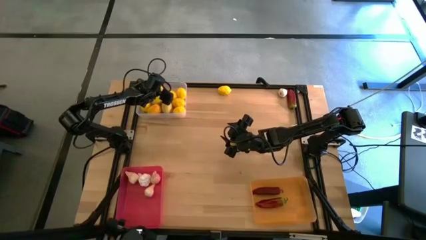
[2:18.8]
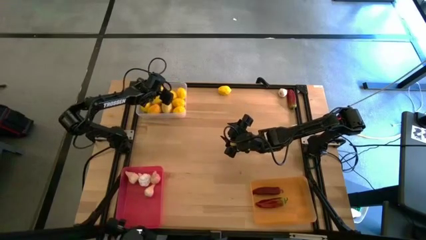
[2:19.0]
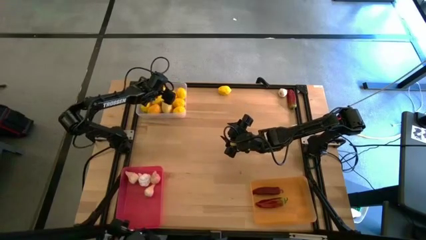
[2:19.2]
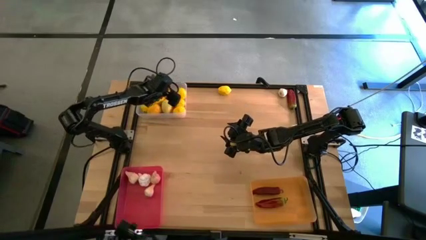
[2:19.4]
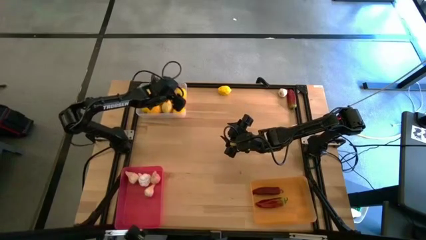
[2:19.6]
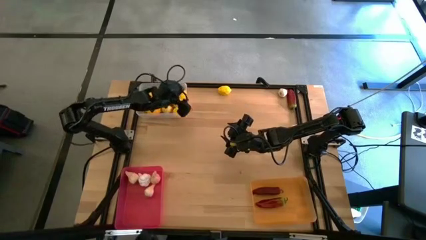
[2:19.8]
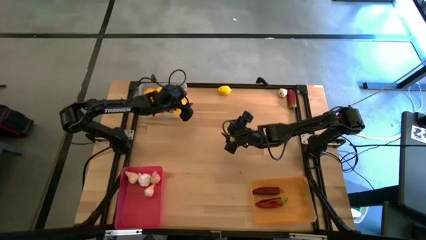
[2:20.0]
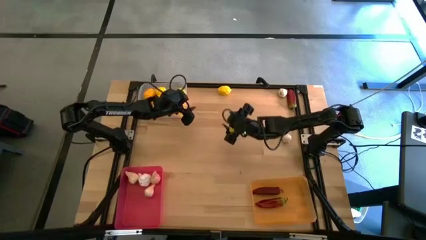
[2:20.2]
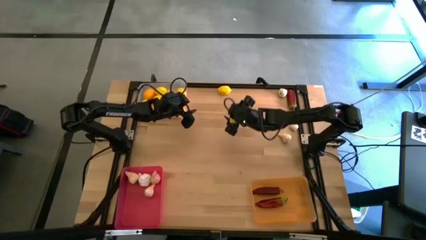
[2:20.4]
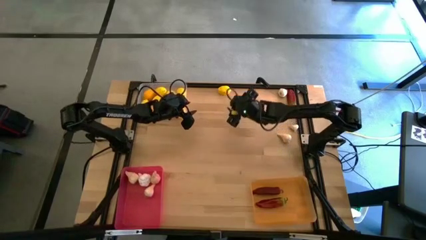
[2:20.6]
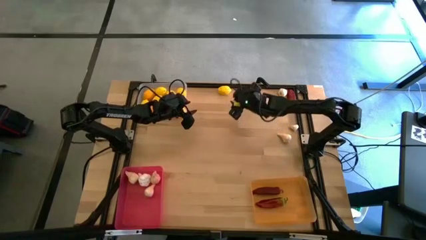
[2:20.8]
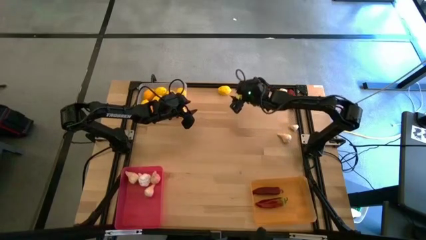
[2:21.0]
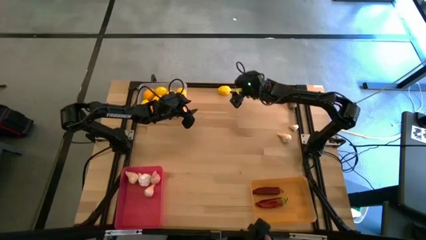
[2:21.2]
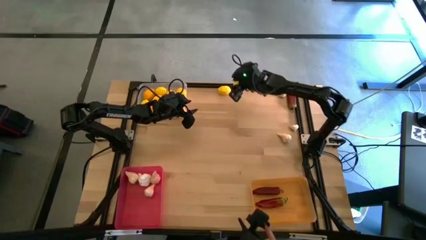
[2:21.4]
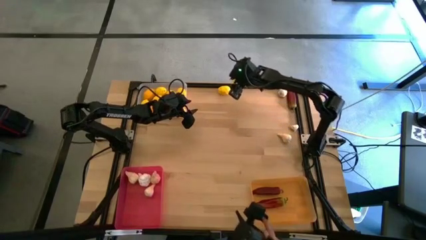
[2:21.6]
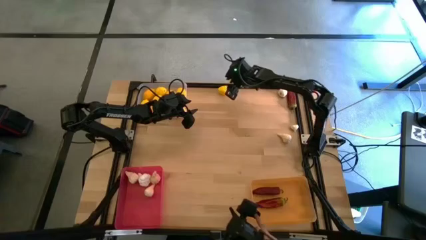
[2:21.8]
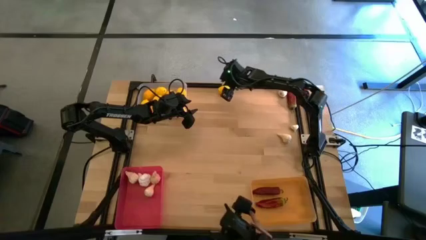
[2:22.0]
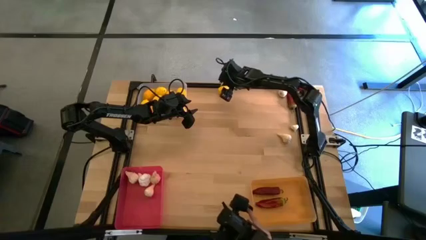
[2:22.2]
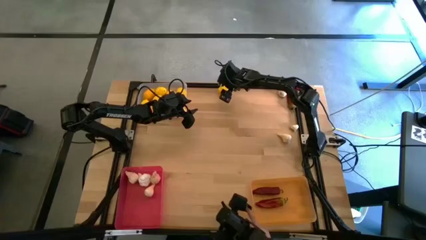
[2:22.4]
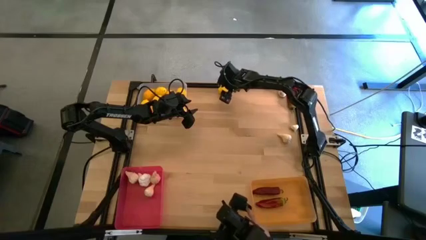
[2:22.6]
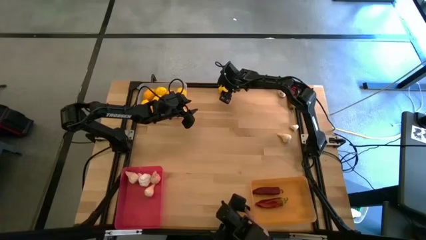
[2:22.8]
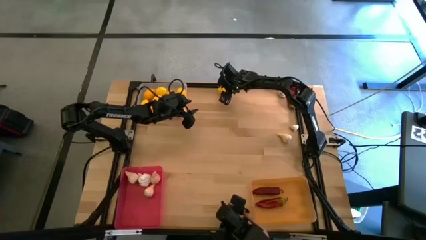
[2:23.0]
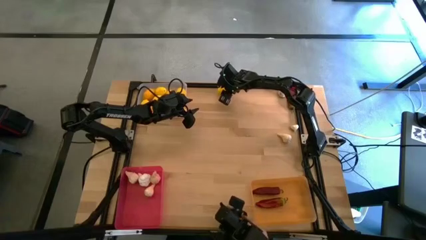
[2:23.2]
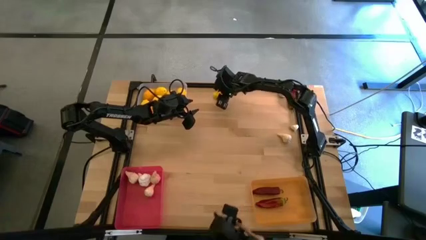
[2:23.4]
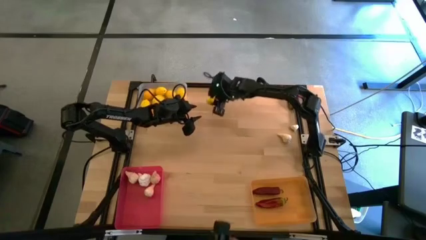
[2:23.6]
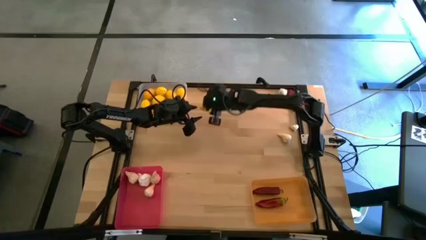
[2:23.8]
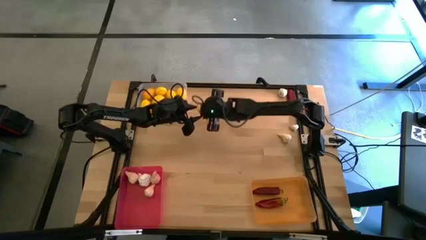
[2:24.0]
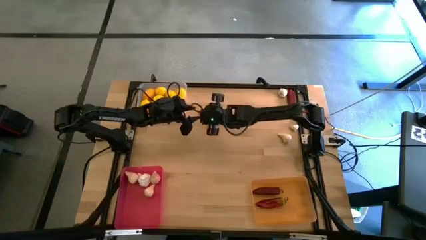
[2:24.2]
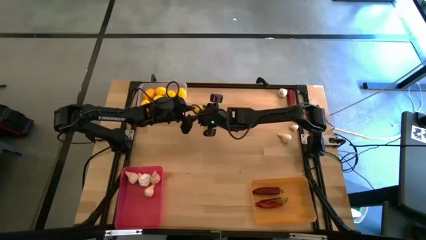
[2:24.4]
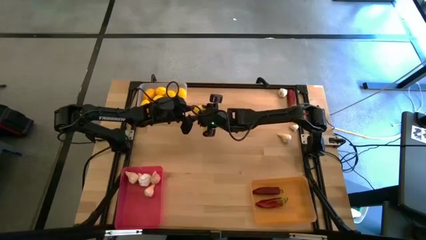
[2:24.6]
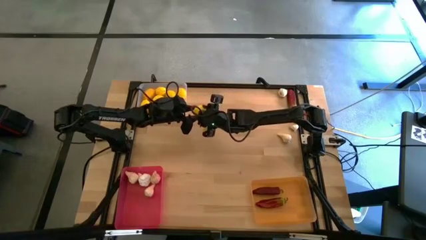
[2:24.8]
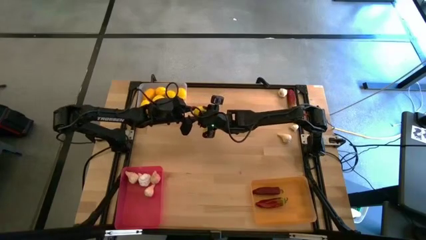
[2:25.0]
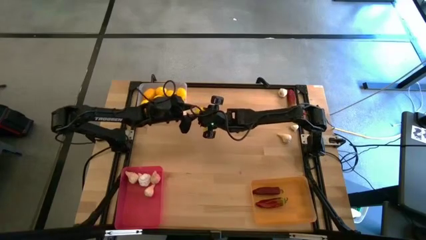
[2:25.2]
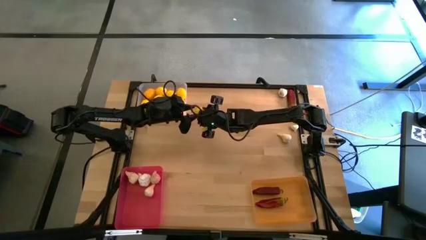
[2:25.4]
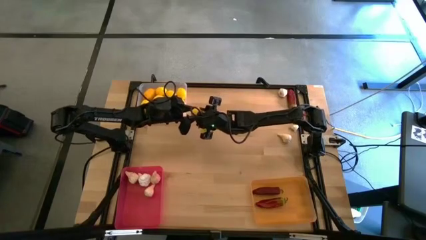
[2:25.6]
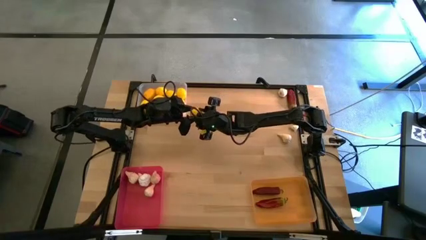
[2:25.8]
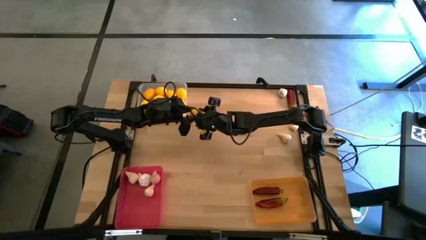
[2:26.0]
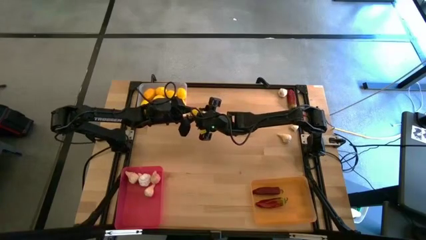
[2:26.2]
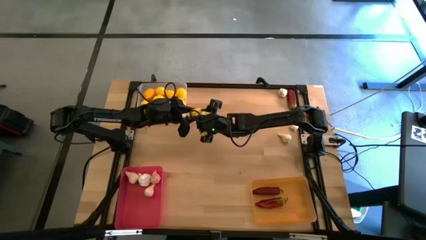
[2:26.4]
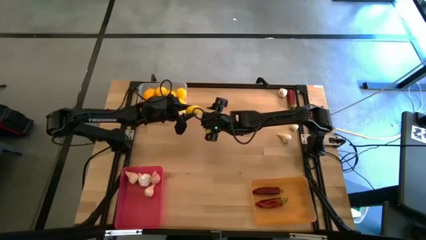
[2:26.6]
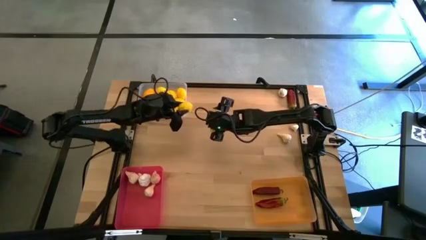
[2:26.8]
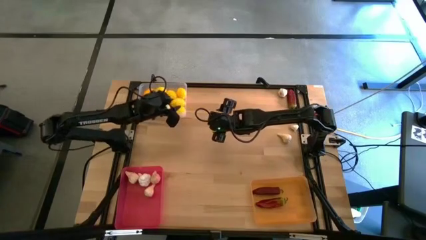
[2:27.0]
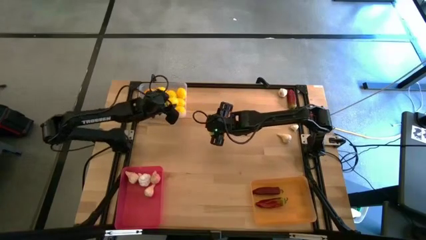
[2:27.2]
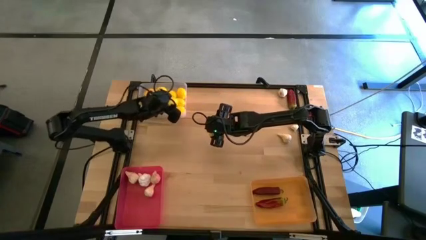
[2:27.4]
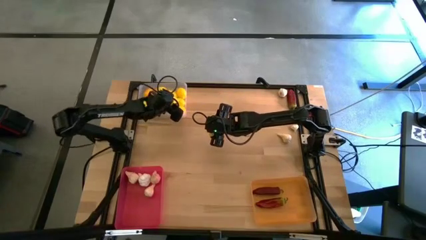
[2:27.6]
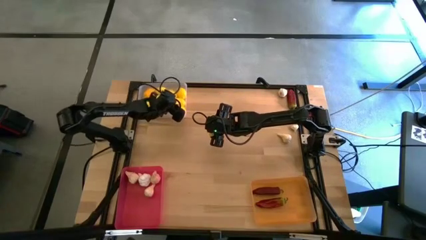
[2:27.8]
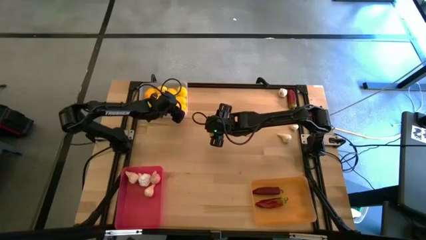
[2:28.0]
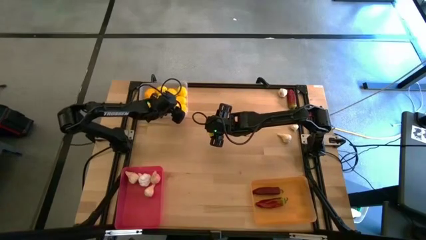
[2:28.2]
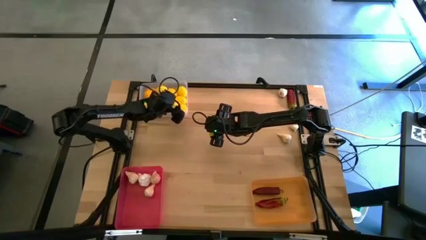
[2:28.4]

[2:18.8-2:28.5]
Task: Sort produce into baskets
Put the yellow lemon into the left white bin

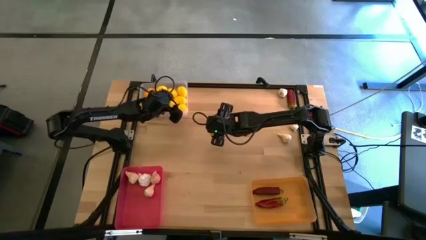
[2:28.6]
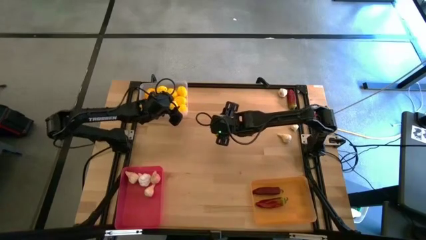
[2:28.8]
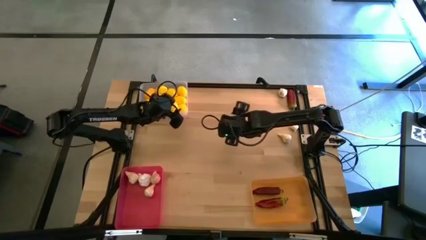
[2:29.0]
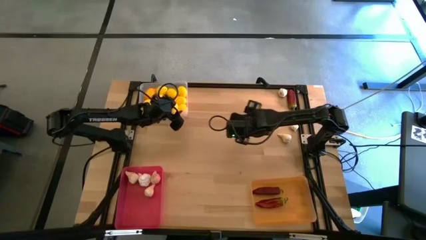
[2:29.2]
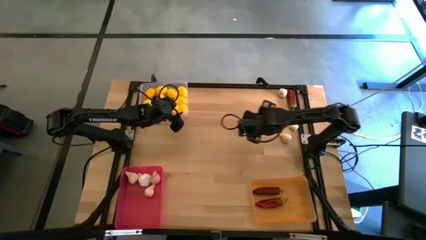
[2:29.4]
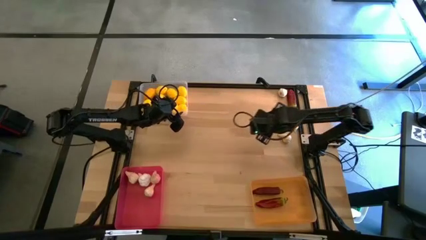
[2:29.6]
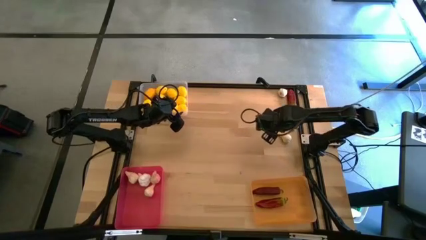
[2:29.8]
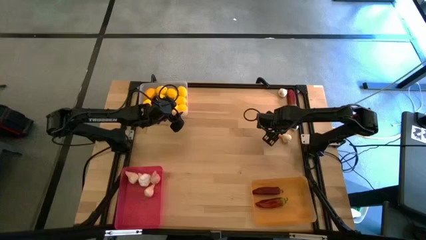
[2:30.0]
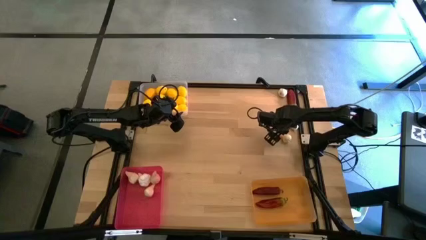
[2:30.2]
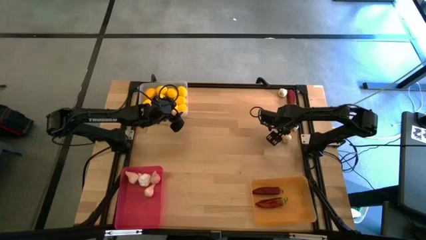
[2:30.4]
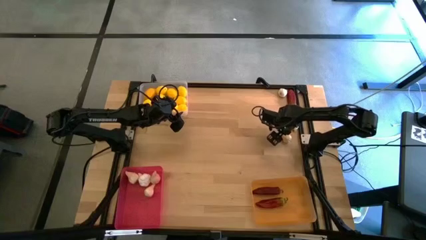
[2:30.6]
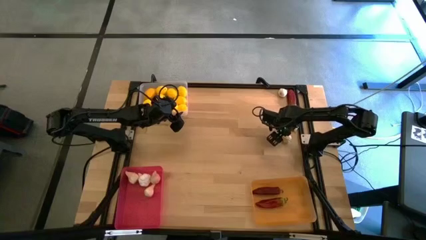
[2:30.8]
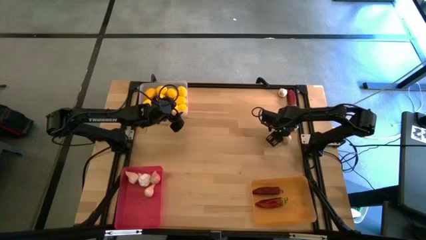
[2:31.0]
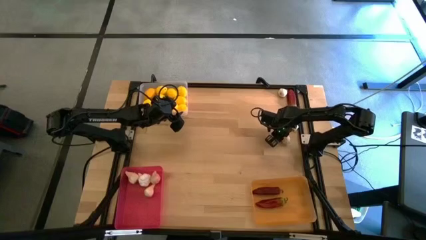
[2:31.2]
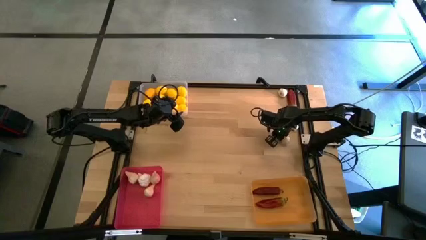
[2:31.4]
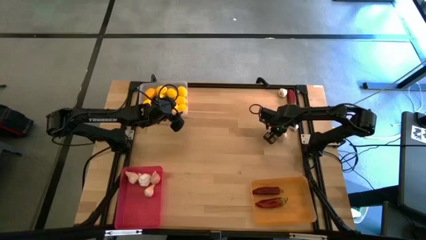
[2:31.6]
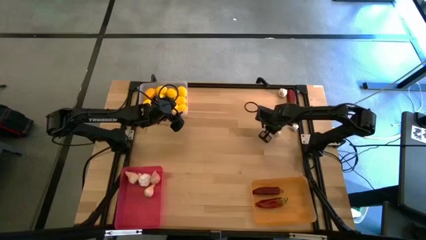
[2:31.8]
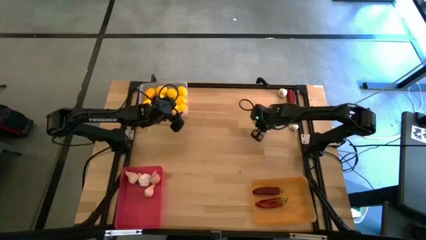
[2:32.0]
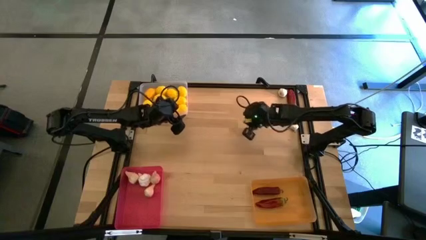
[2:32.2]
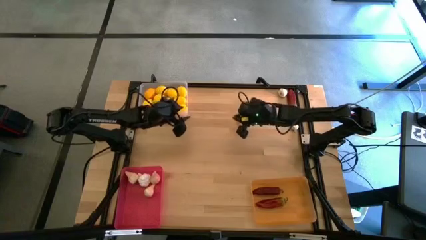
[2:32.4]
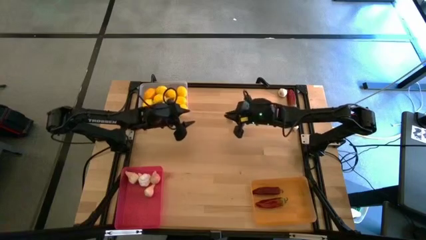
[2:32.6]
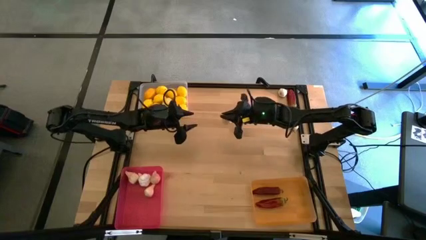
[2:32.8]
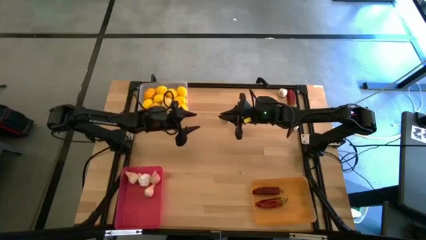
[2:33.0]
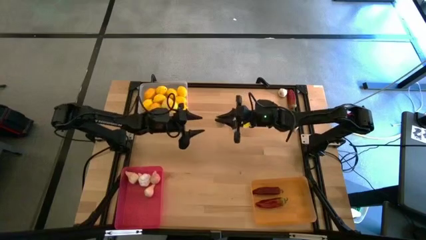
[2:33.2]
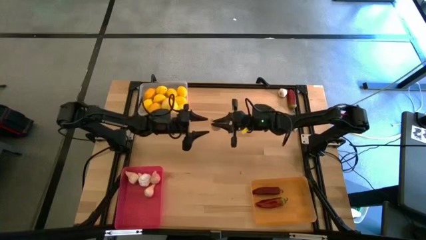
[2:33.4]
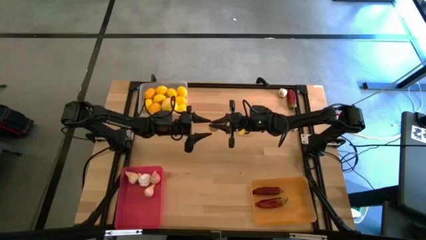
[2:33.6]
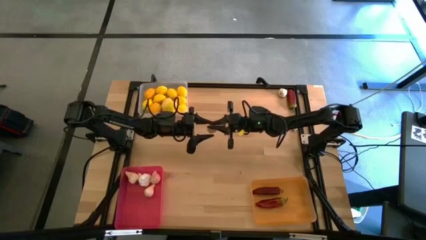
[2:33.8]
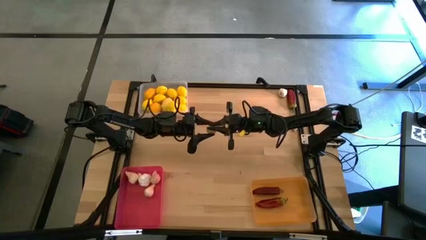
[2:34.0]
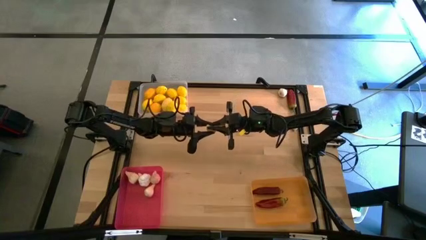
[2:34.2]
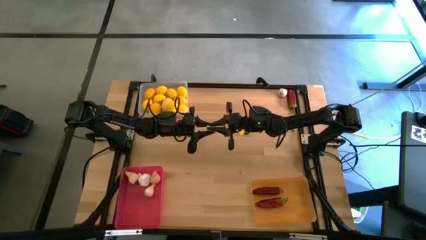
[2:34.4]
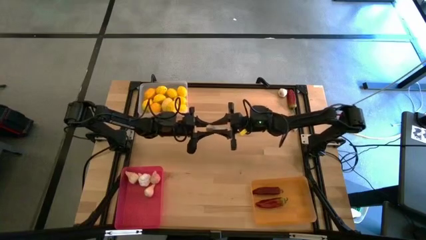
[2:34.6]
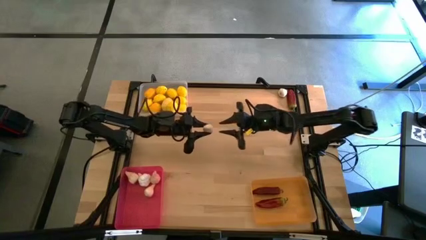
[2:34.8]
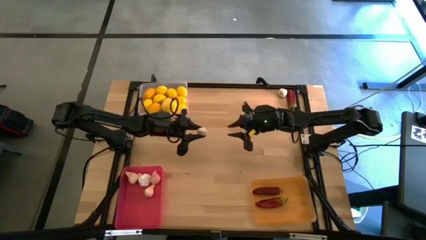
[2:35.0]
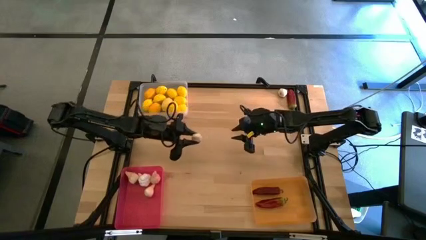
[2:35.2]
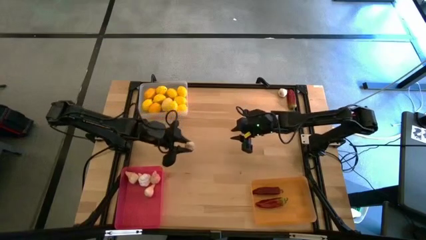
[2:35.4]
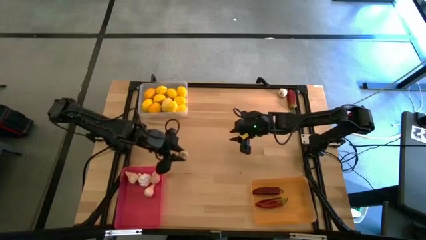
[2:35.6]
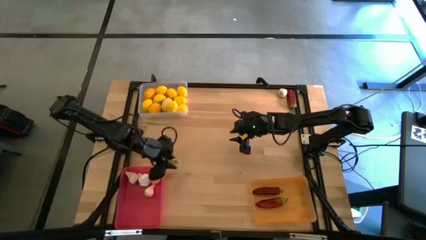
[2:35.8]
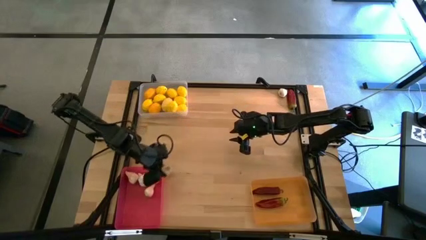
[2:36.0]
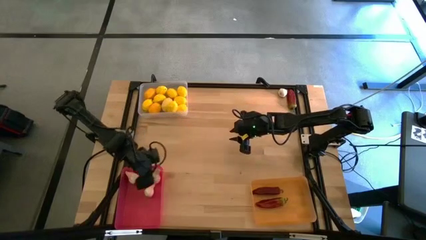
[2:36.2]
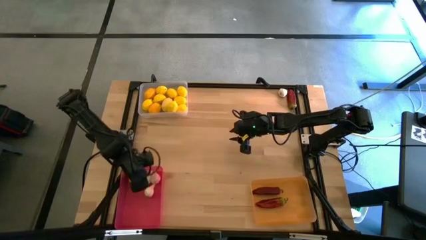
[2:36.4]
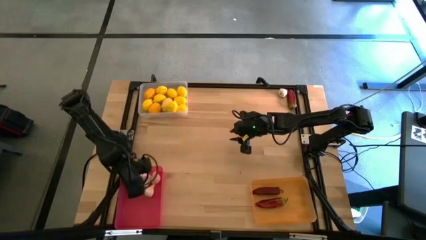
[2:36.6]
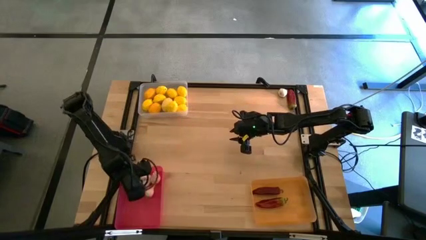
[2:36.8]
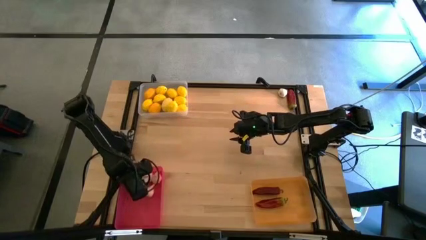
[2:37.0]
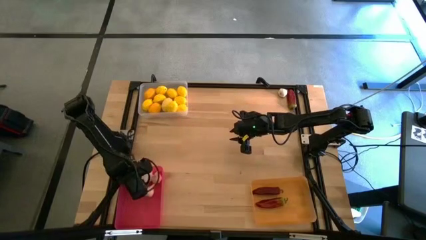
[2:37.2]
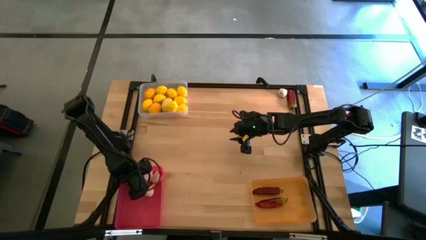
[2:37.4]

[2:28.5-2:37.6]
Put the white garlic into the bottom left red bin
